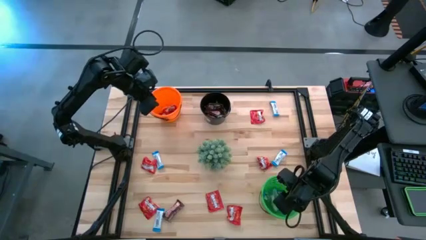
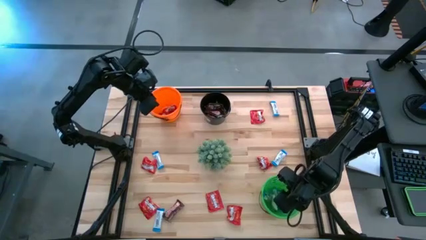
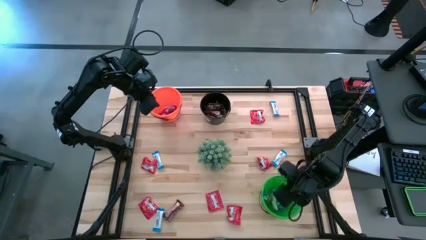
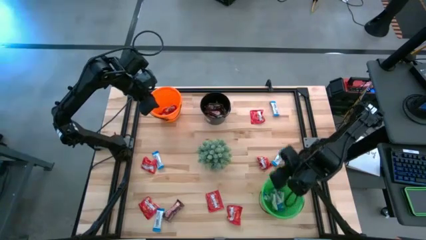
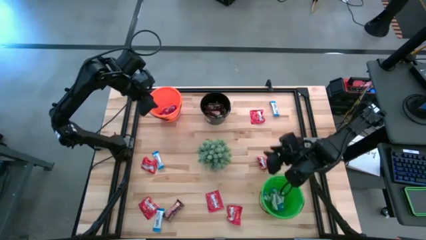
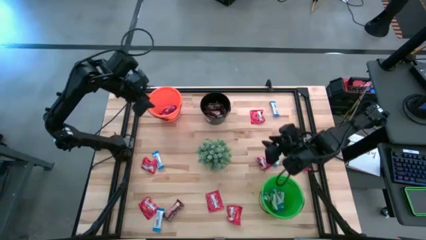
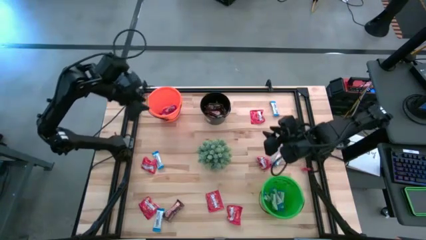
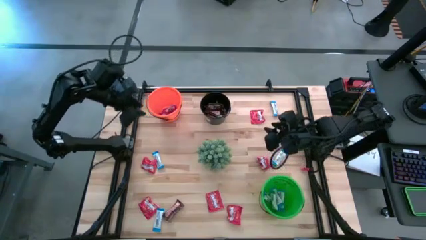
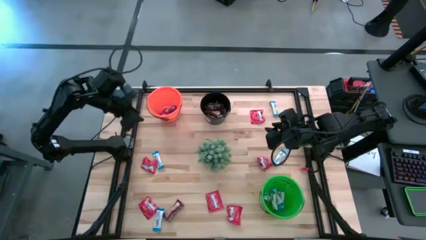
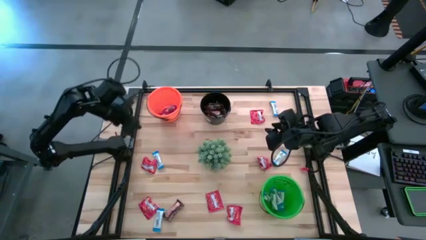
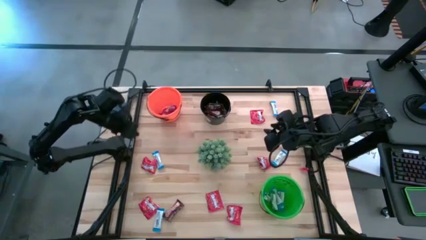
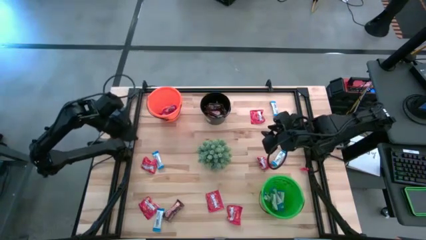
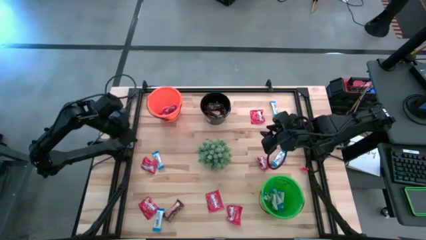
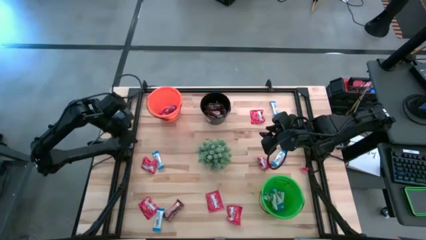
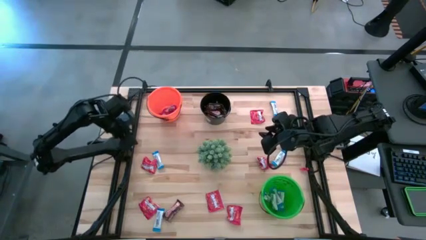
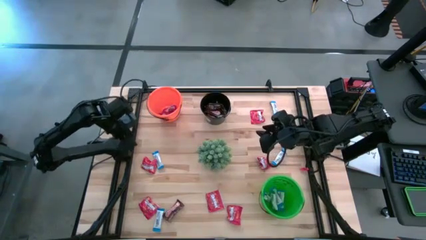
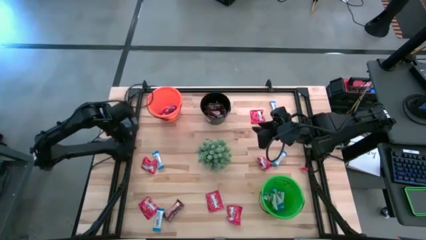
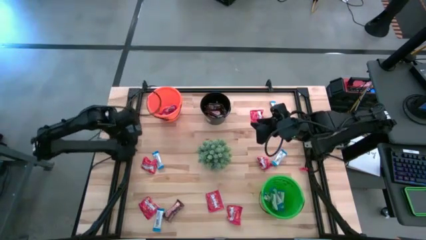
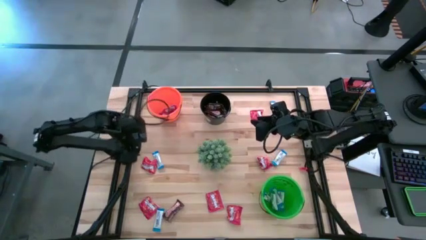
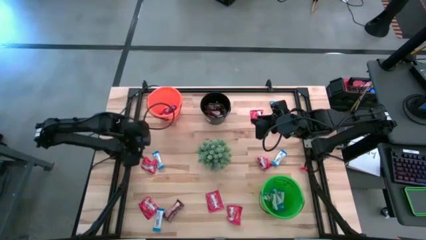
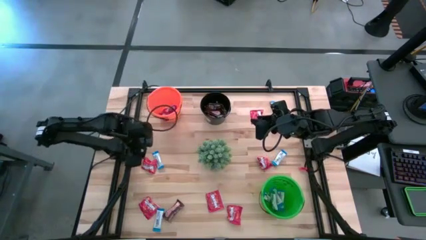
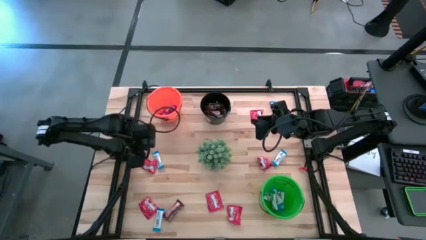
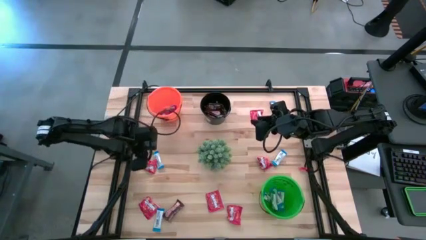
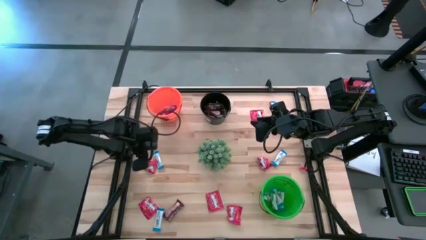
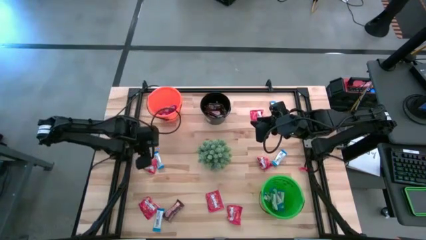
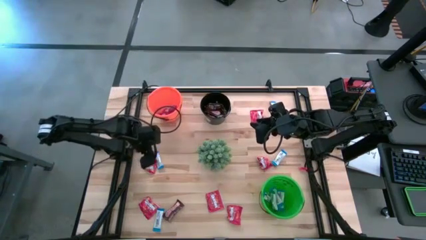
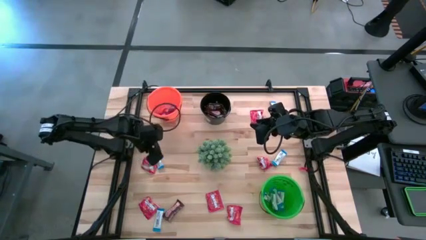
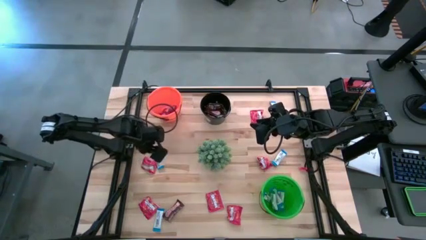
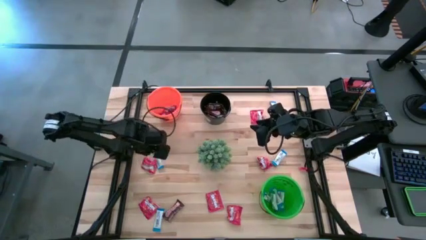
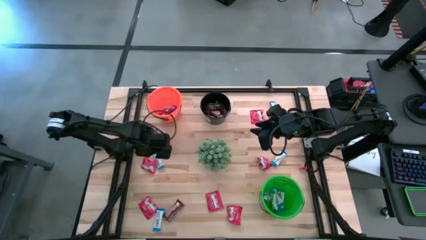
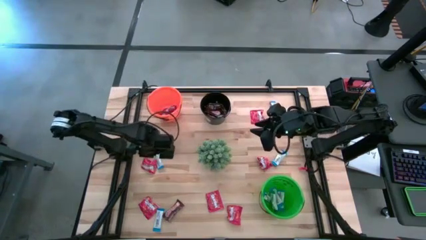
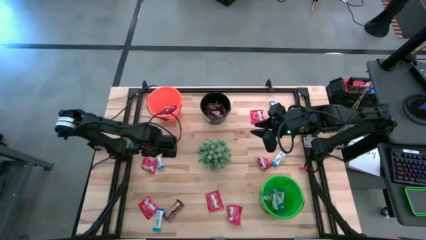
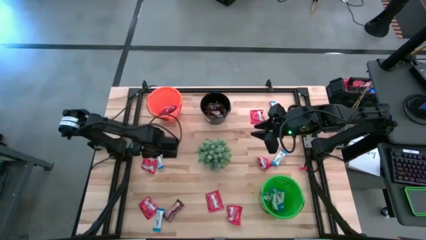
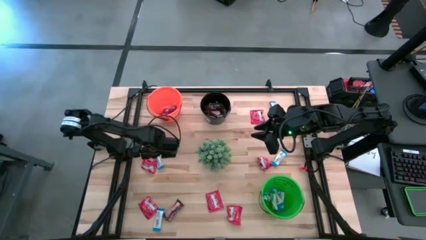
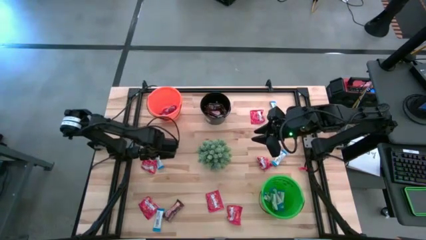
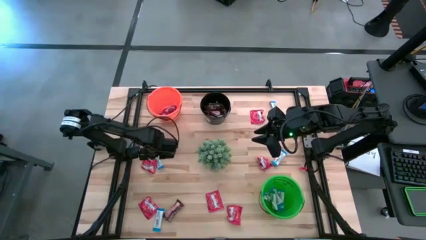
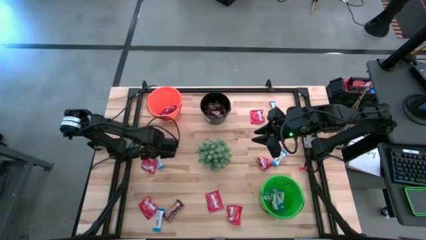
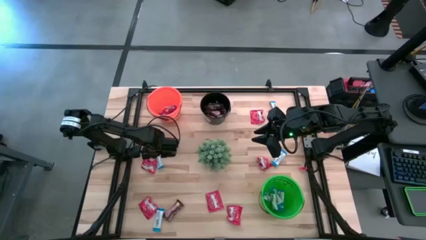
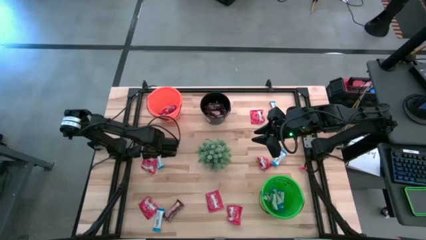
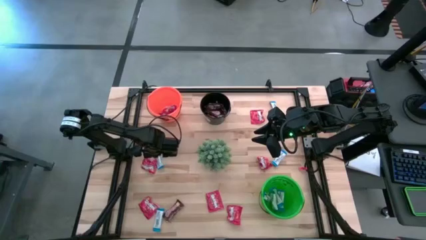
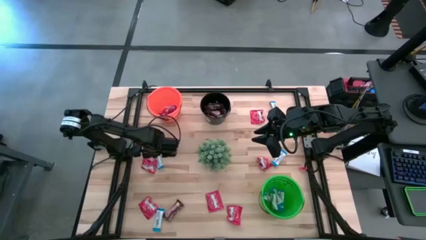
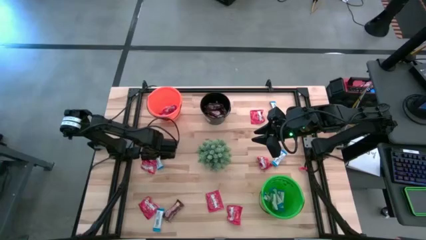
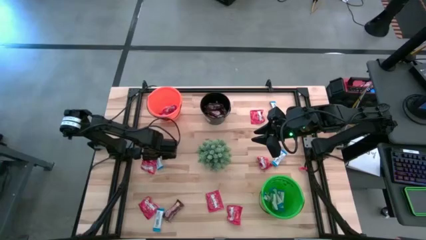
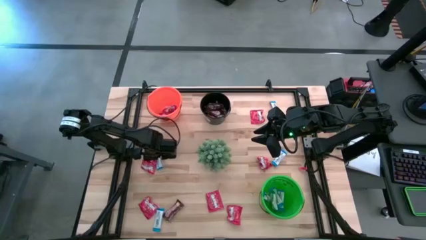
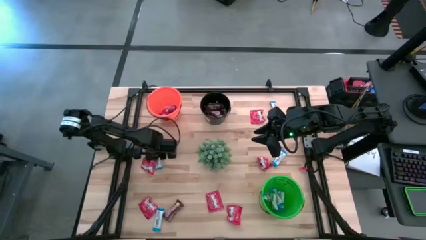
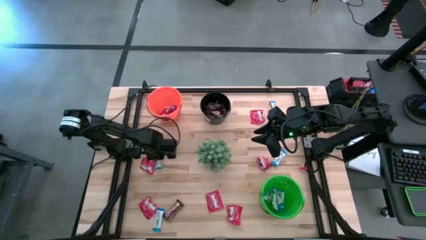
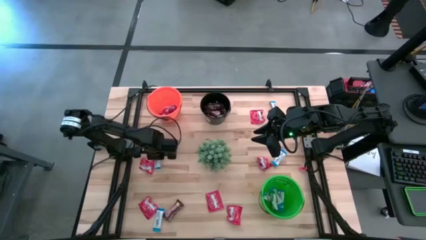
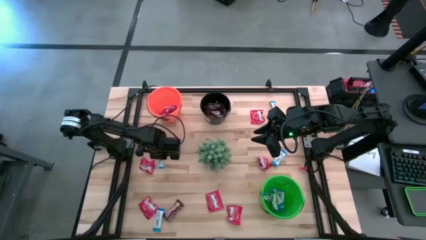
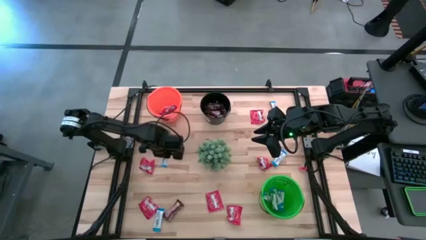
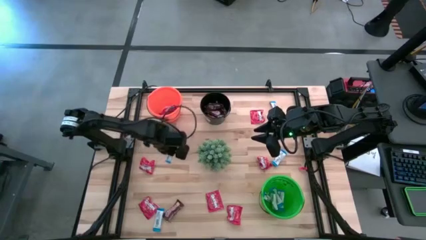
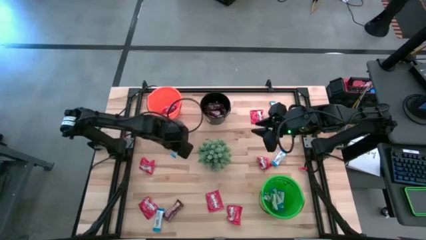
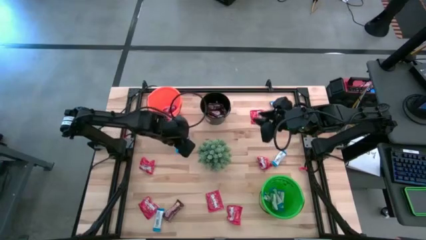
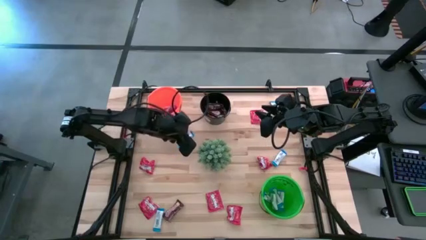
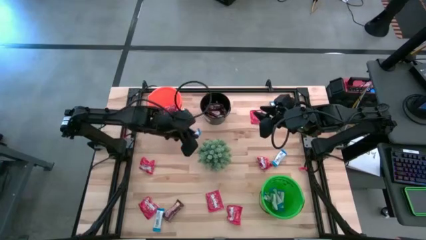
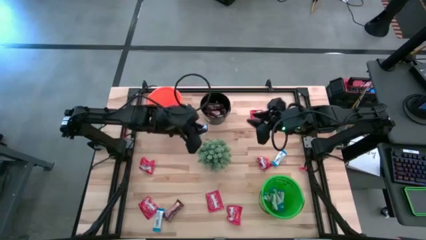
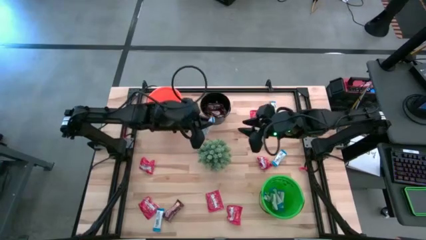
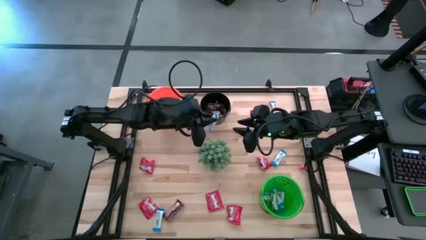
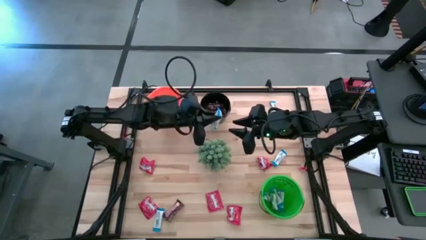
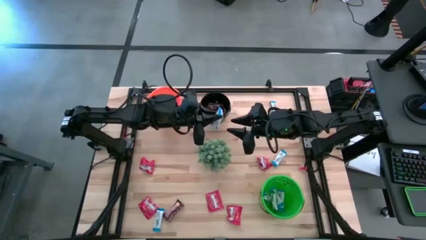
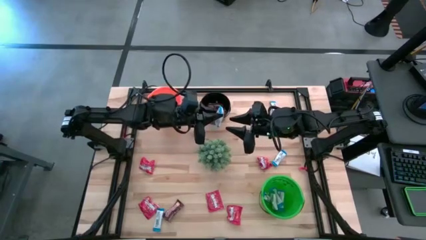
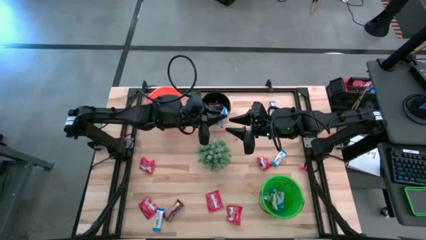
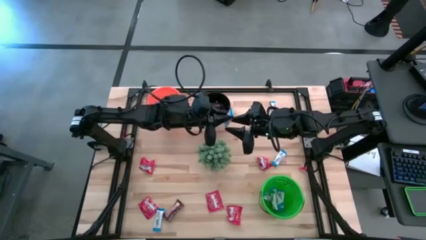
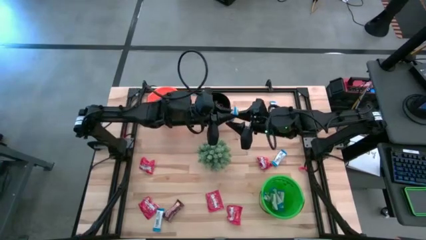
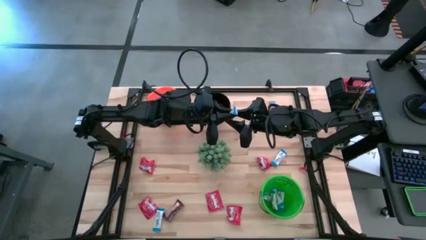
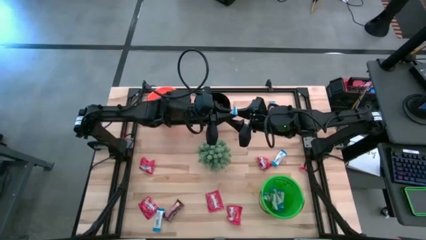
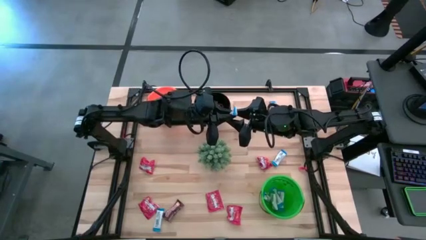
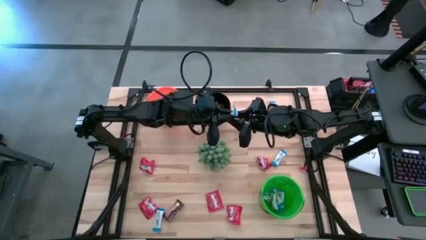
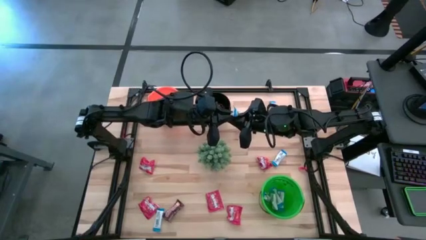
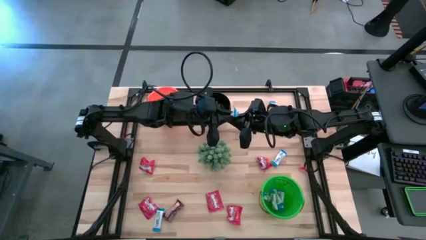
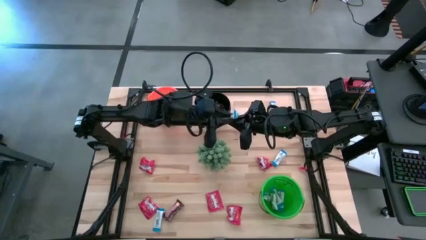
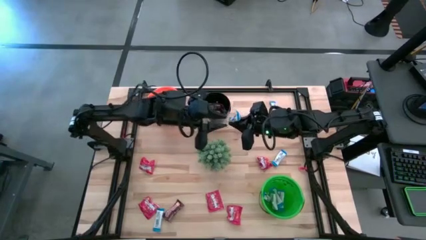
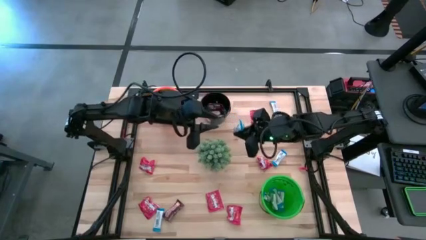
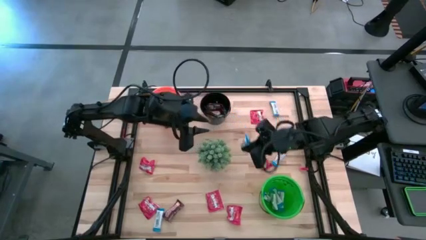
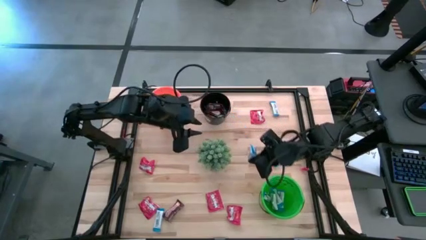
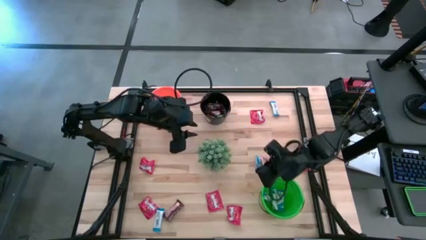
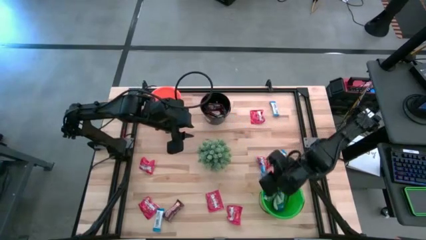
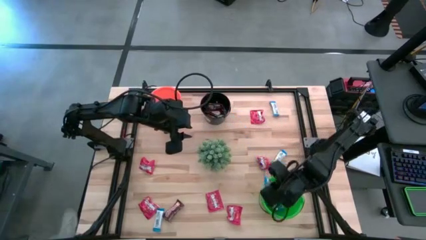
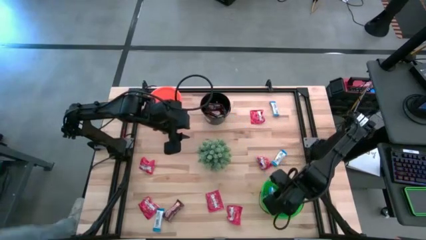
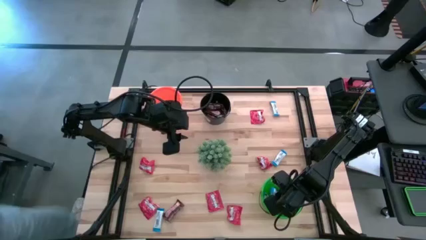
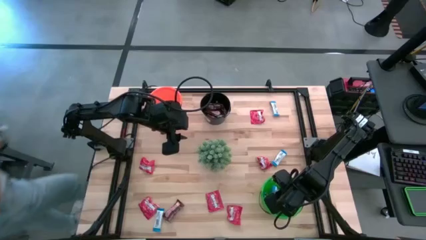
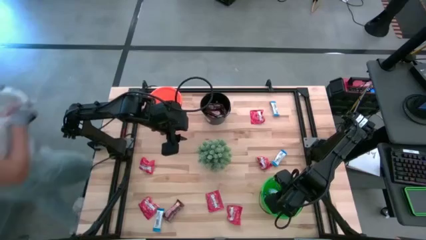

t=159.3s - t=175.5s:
Task: Sort candy
Put the blue chocolate into the green bucket
